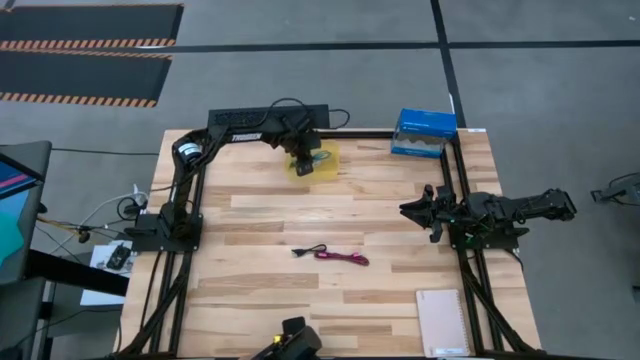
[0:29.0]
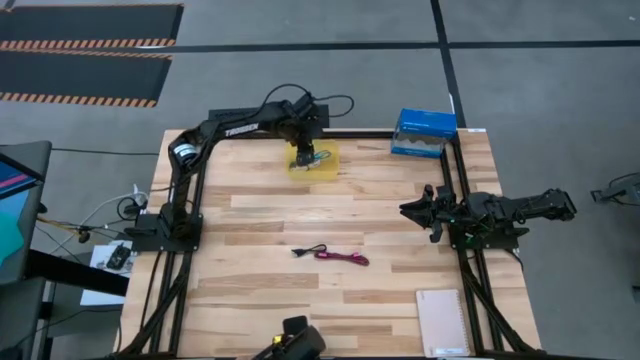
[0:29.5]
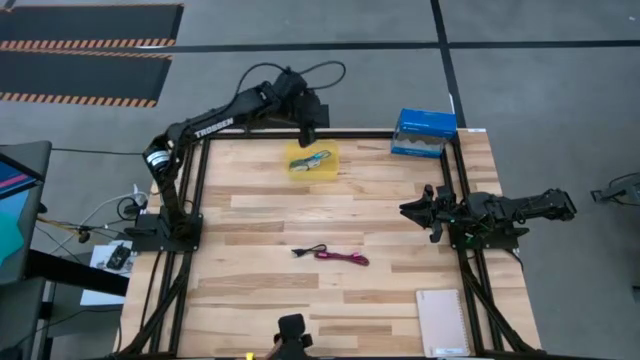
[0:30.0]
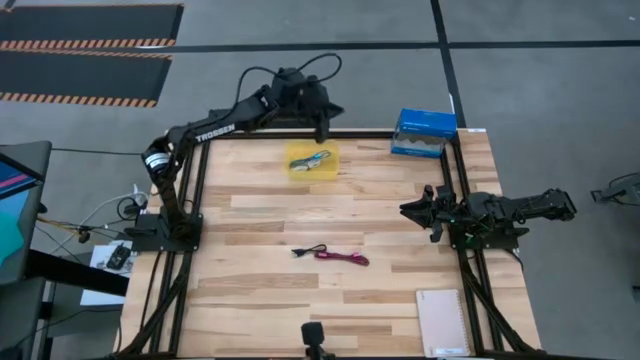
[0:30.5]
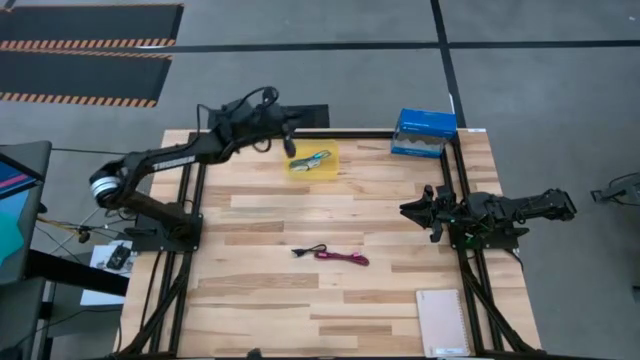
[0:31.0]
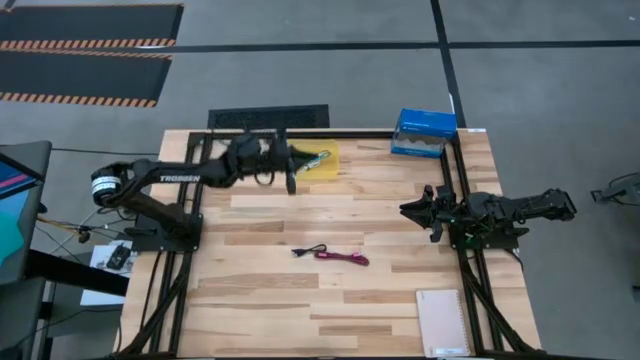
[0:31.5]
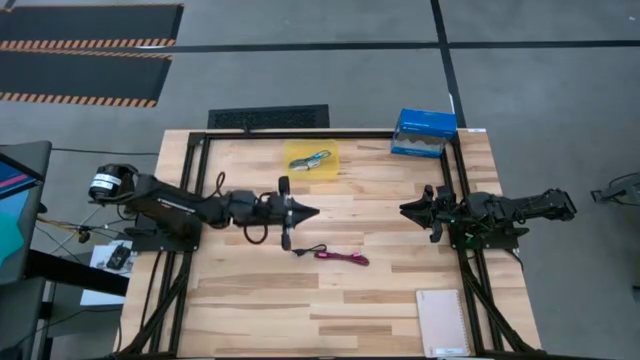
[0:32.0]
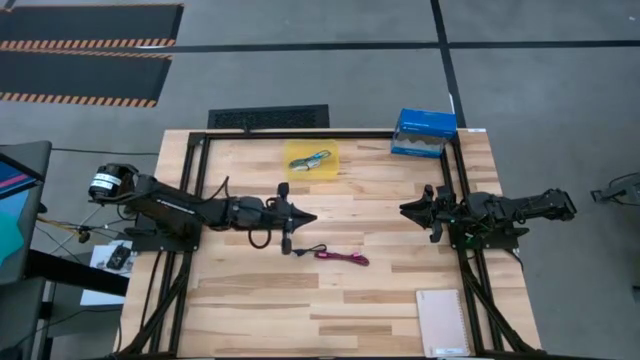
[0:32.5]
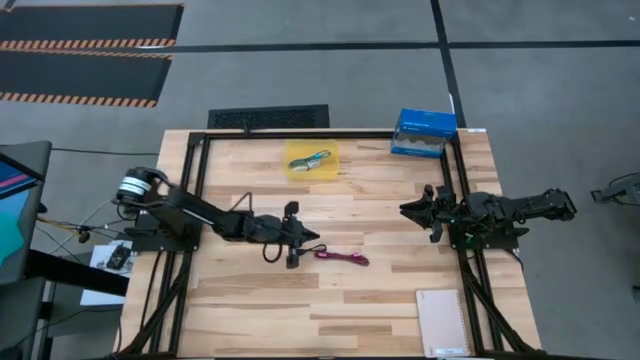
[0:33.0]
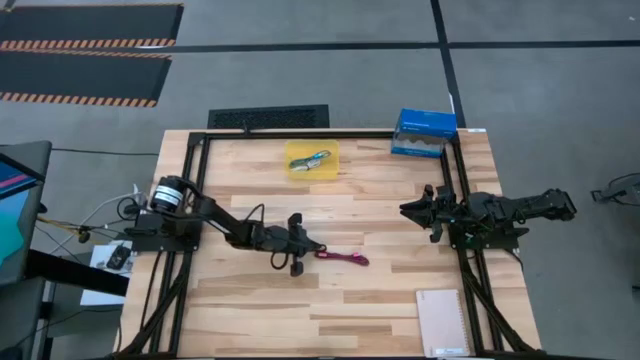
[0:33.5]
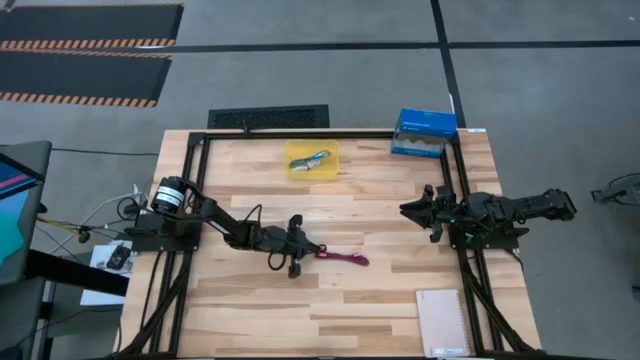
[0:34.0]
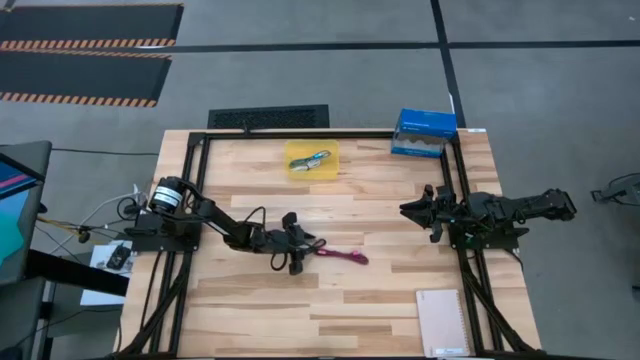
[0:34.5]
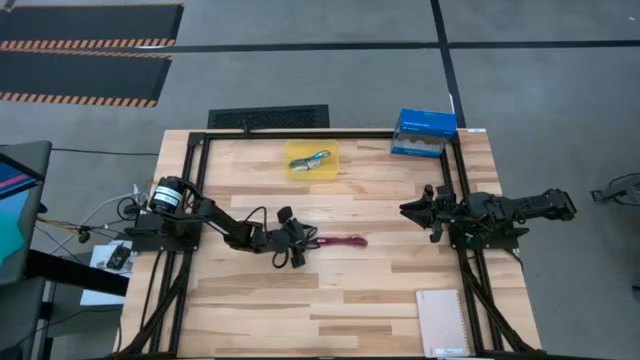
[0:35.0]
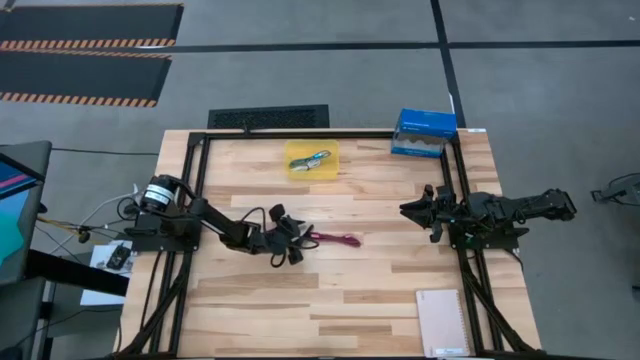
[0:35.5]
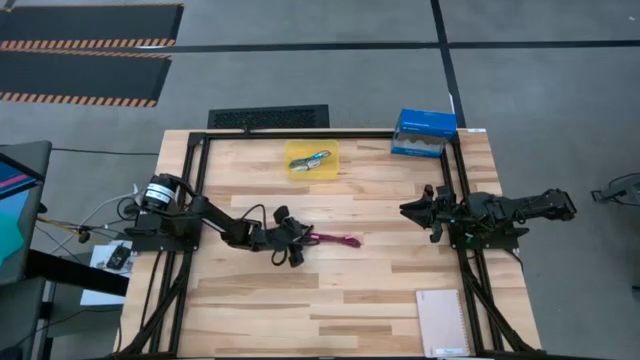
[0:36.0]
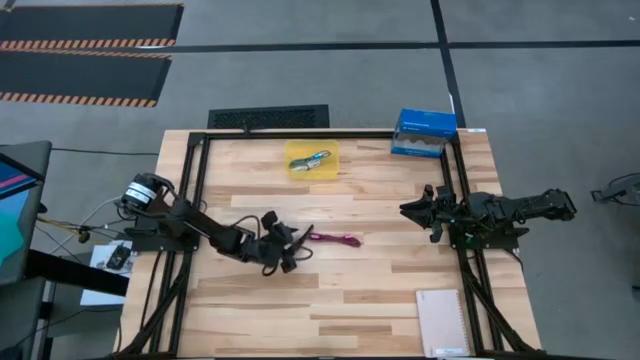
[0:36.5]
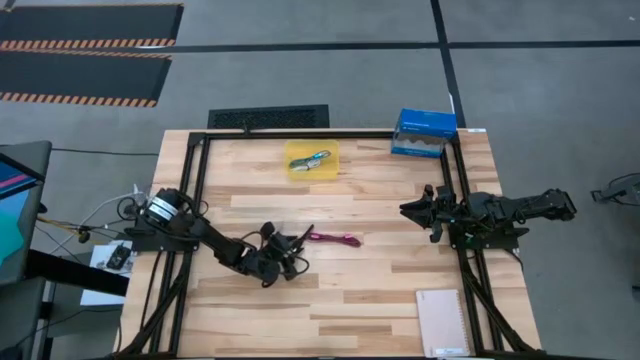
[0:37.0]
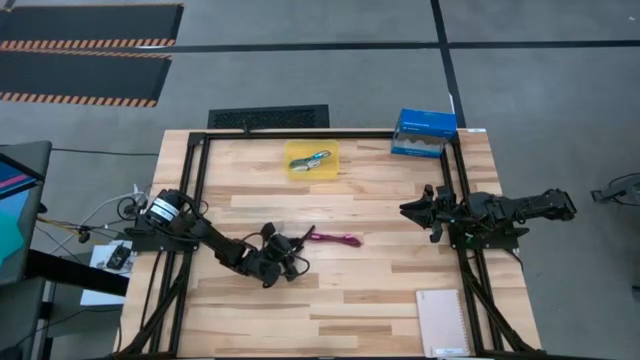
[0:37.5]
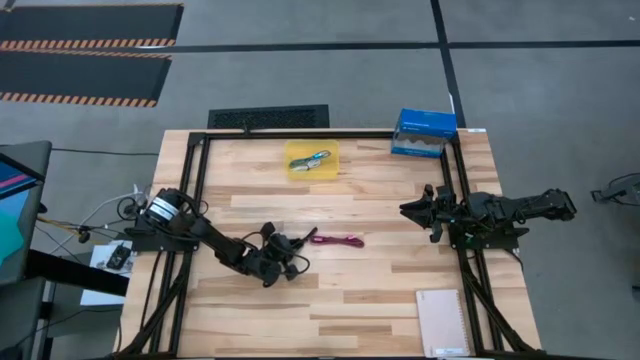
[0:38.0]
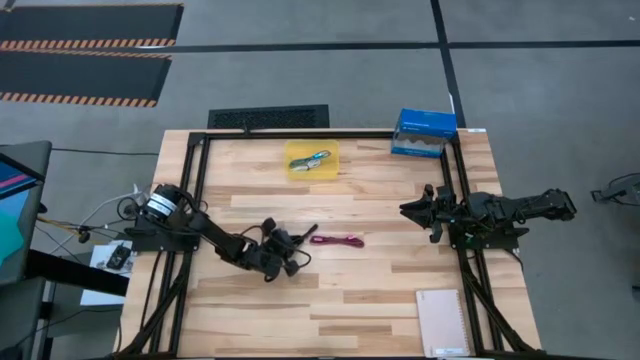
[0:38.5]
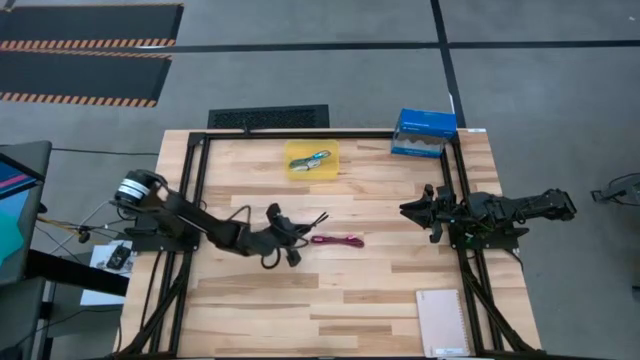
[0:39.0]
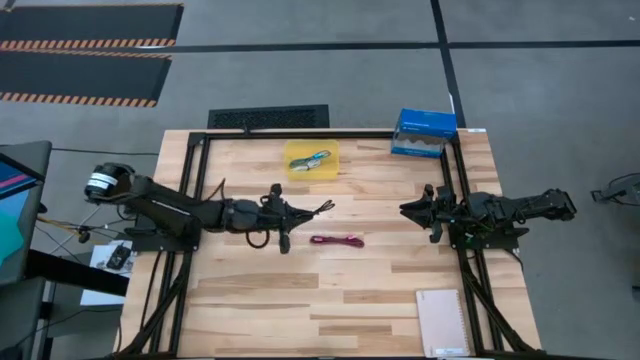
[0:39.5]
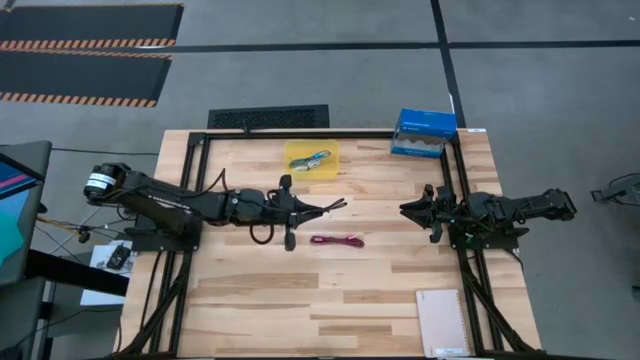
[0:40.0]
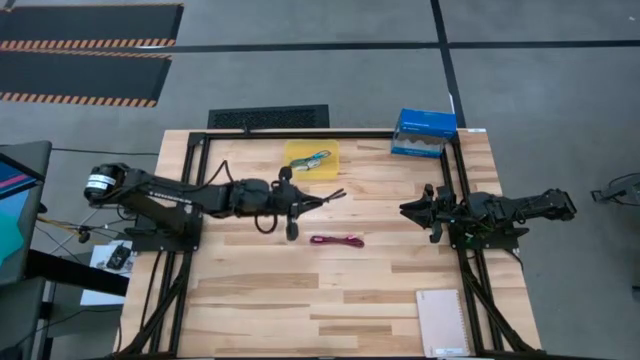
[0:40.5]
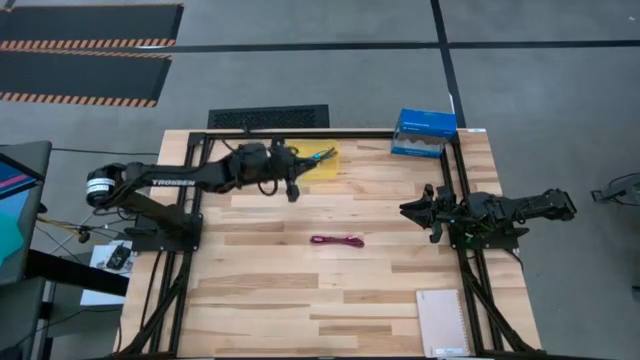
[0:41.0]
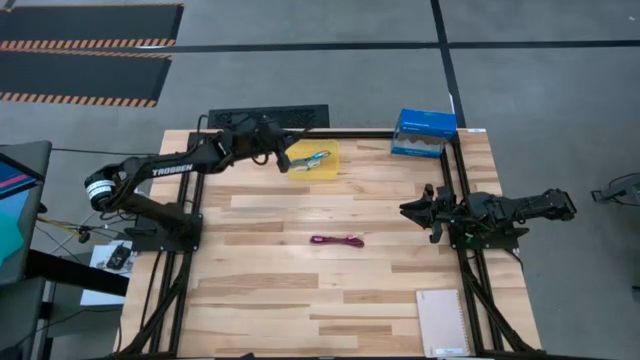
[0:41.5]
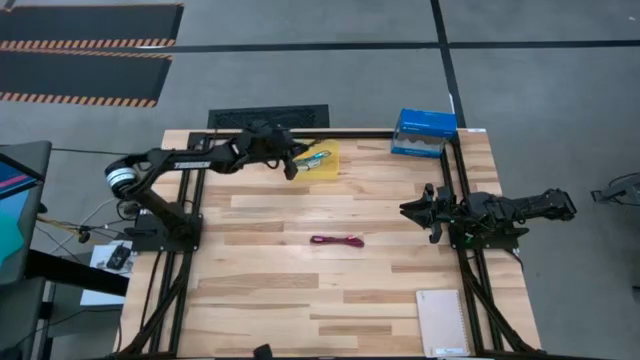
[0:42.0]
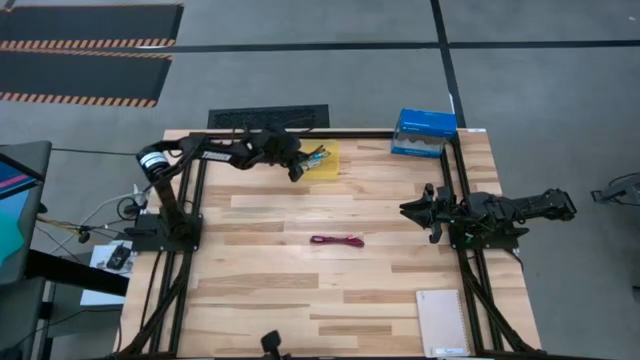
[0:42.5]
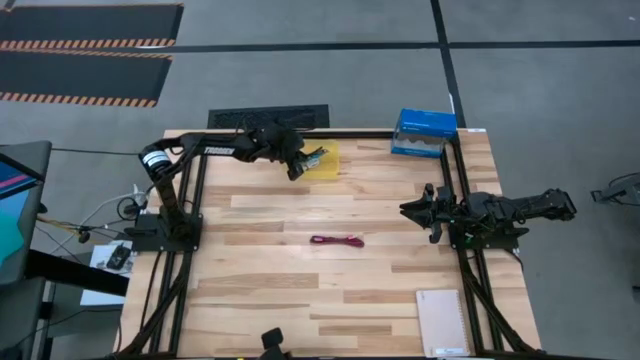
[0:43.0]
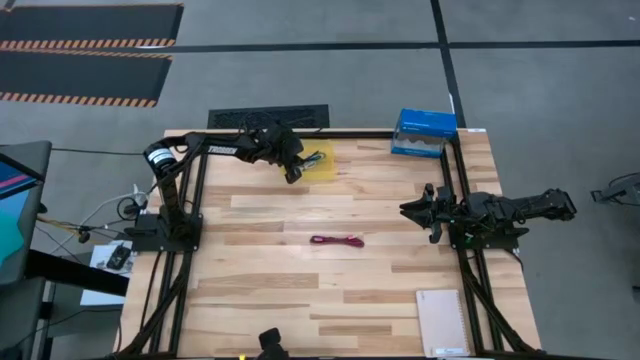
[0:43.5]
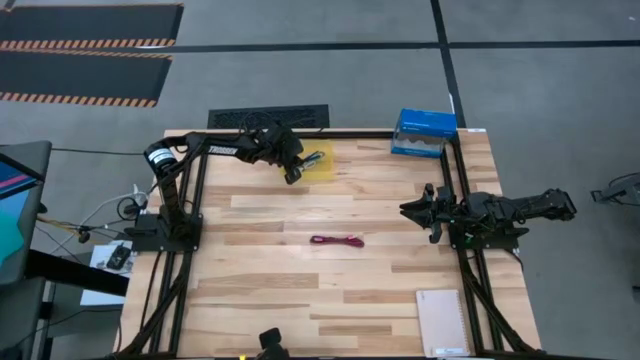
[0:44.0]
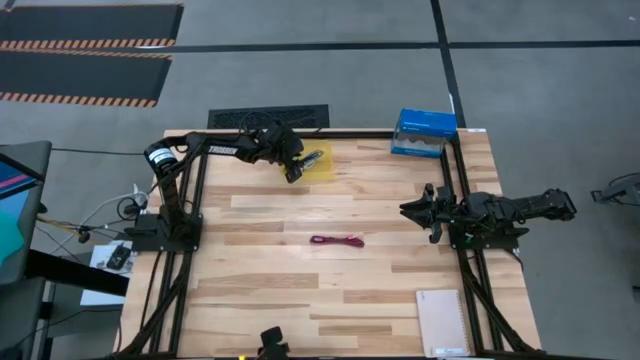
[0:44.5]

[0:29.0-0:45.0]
Task: Pick and place USB-C Cables
Put the black charger cable into the yellow bin

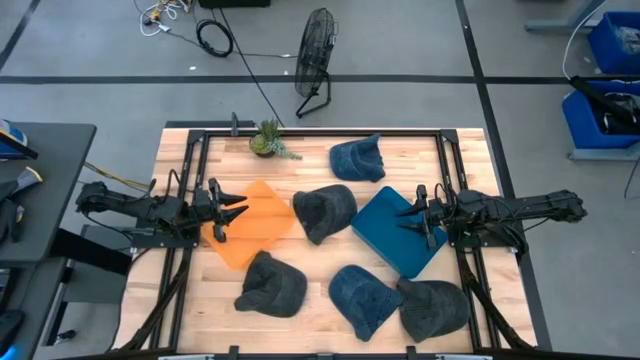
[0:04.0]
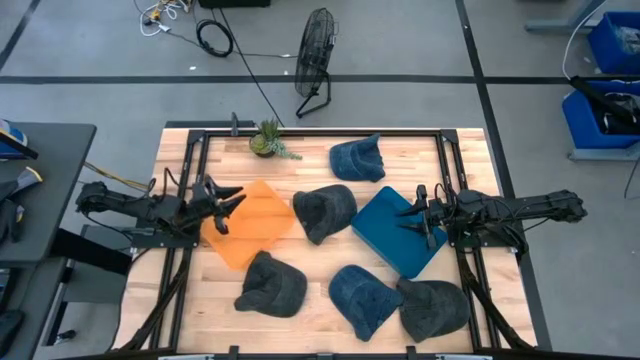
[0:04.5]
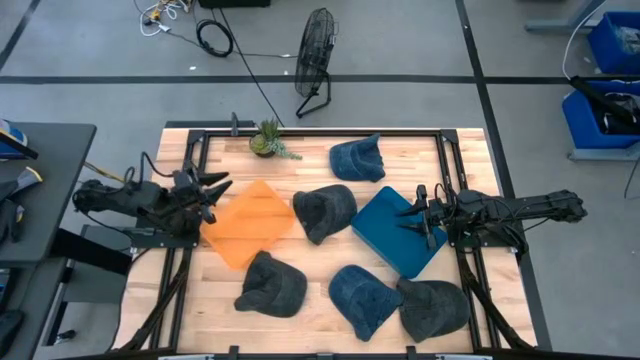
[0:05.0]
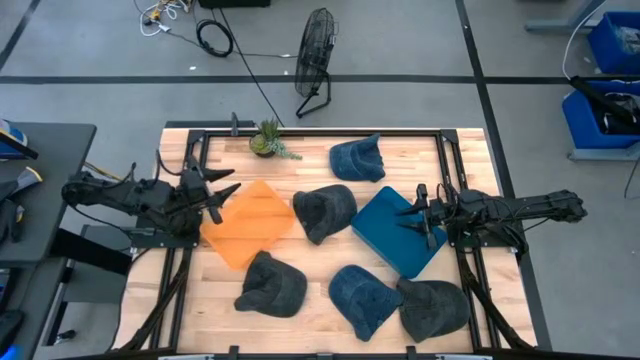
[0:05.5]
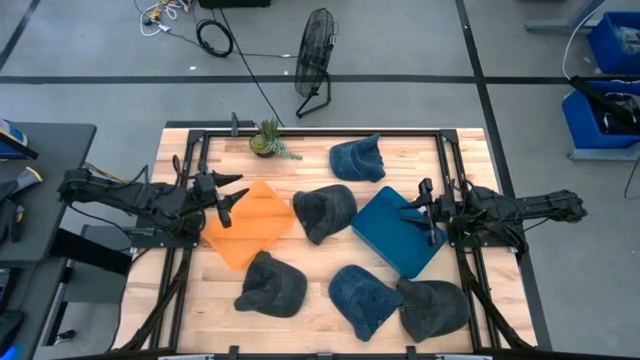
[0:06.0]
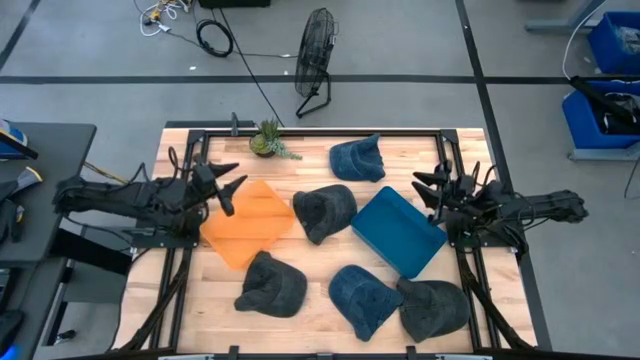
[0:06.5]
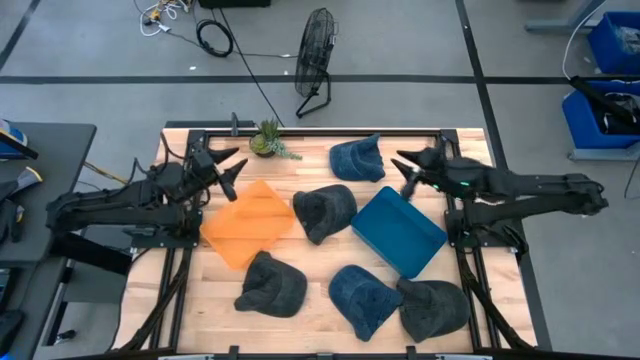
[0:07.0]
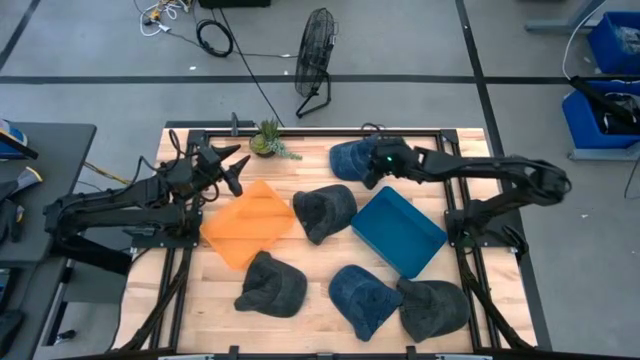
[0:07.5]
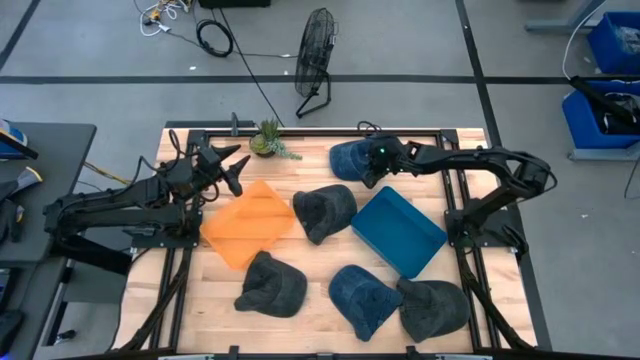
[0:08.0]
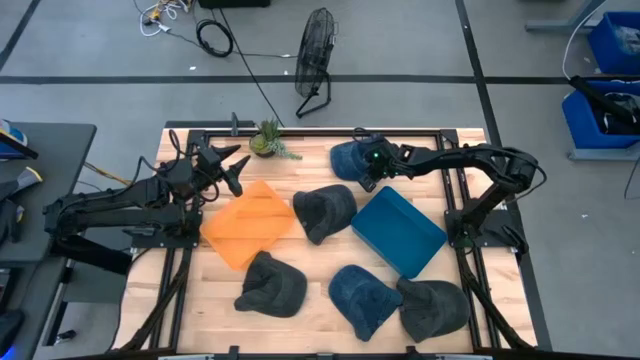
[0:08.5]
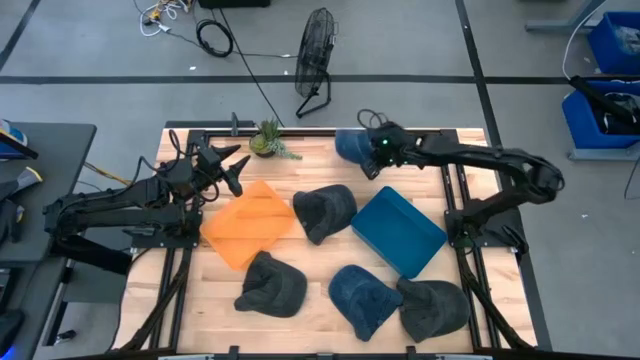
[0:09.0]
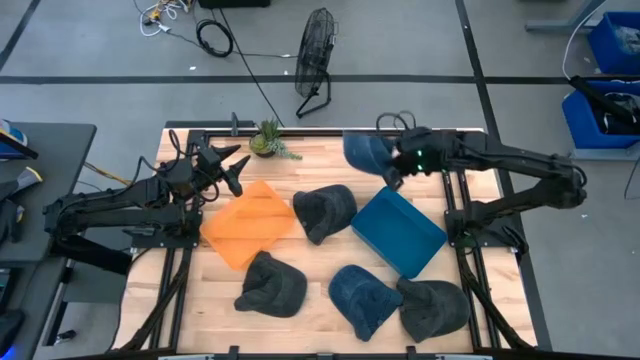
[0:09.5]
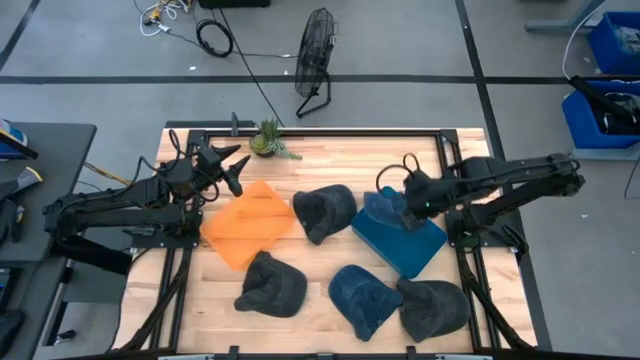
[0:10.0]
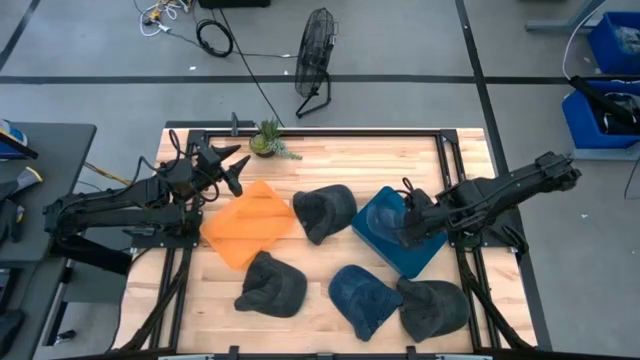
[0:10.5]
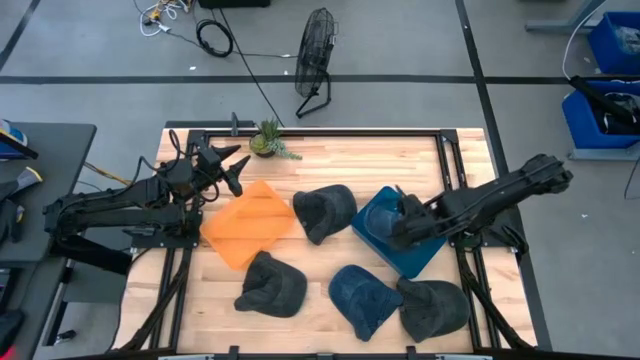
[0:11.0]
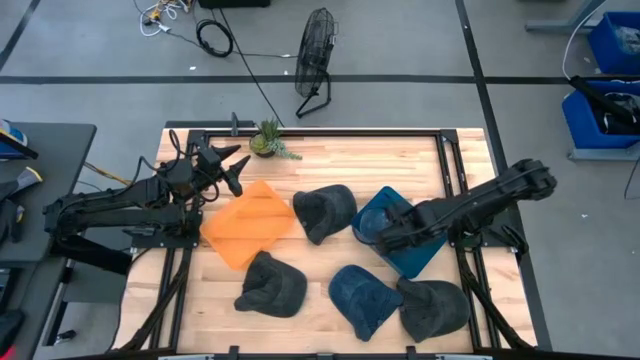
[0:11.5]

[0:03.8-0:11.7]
Task: Pick & Place hat
Put the top blue cap into the blue bin
